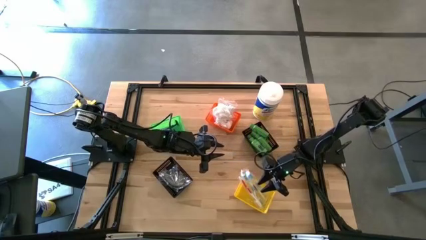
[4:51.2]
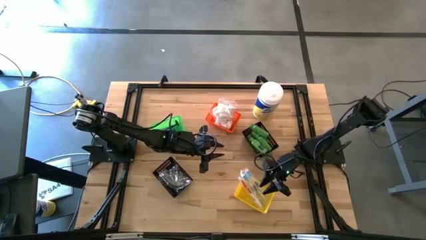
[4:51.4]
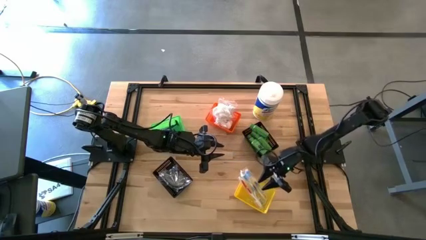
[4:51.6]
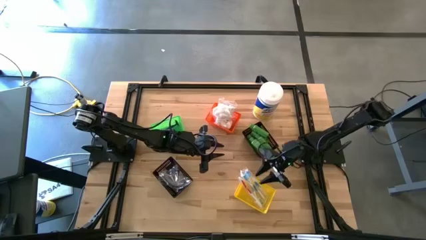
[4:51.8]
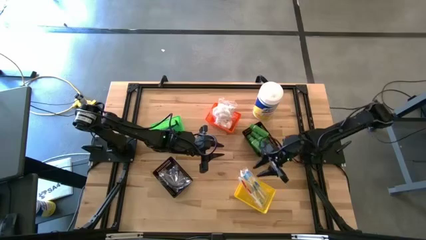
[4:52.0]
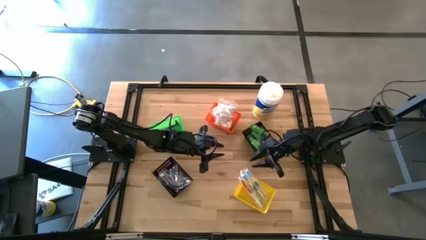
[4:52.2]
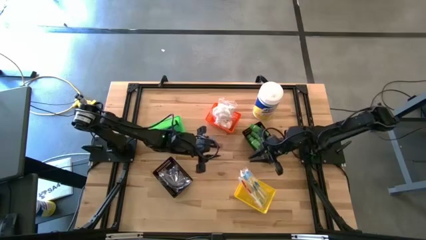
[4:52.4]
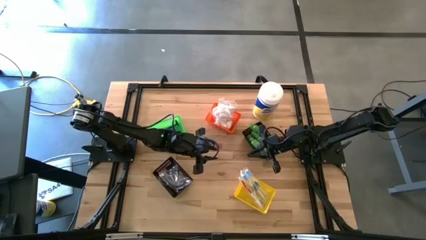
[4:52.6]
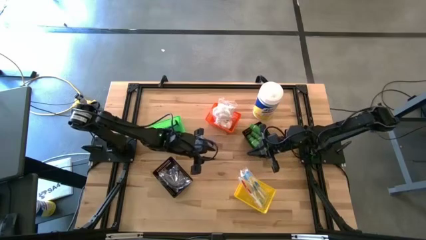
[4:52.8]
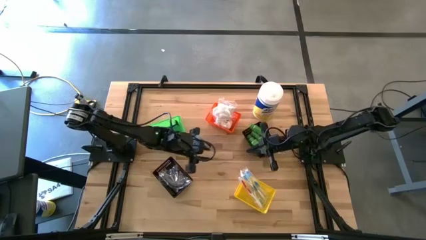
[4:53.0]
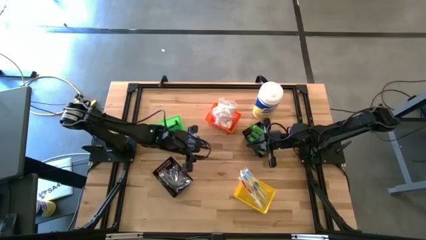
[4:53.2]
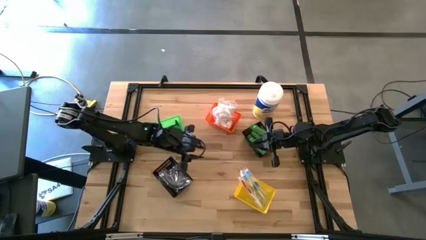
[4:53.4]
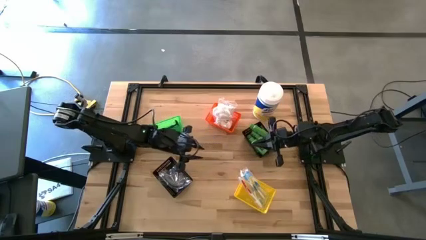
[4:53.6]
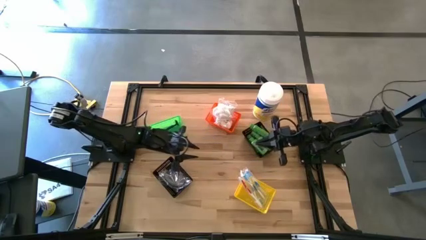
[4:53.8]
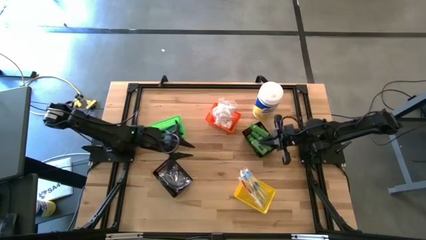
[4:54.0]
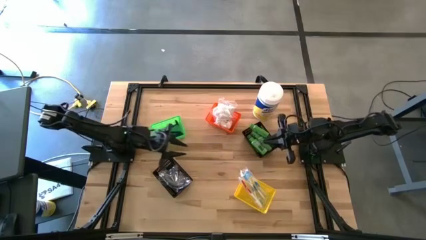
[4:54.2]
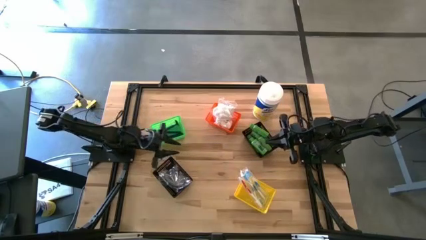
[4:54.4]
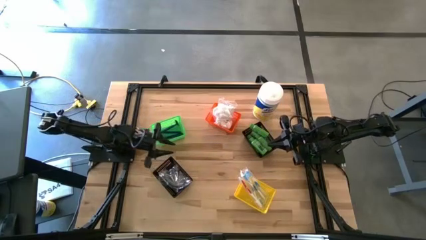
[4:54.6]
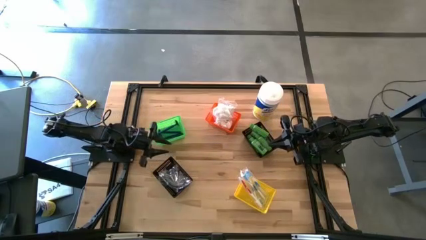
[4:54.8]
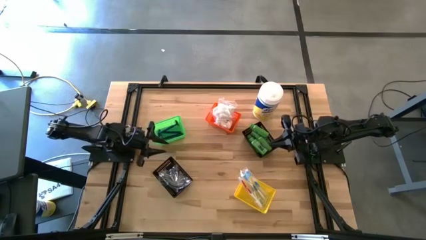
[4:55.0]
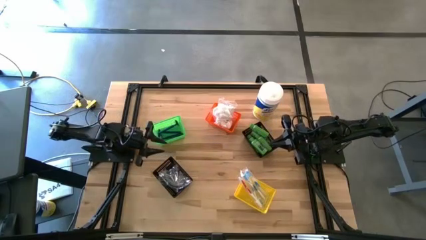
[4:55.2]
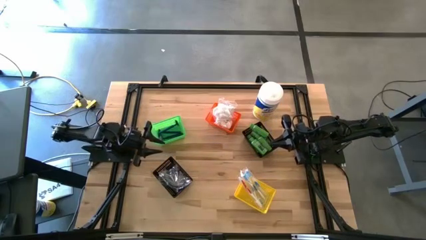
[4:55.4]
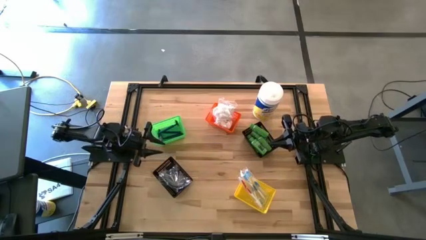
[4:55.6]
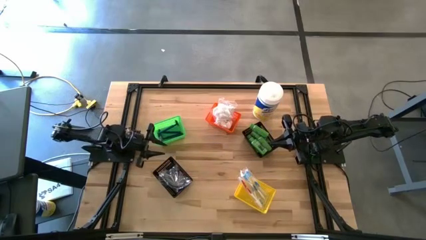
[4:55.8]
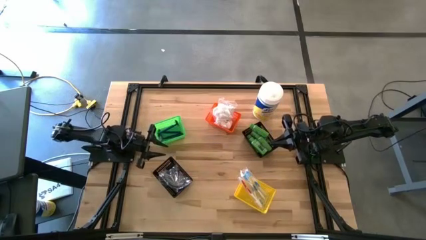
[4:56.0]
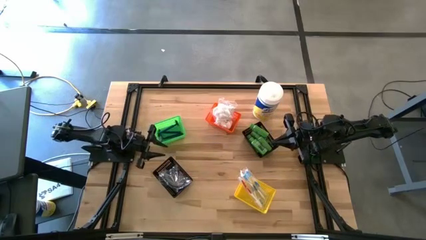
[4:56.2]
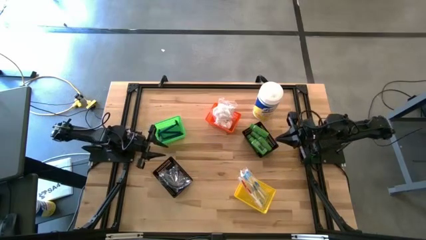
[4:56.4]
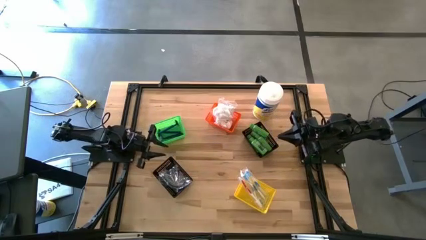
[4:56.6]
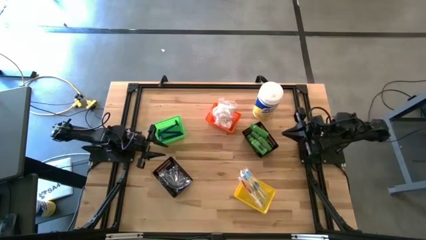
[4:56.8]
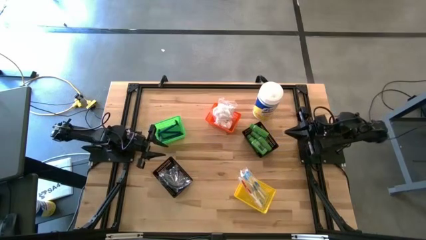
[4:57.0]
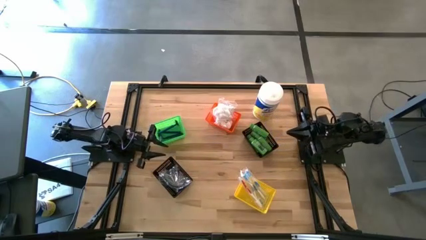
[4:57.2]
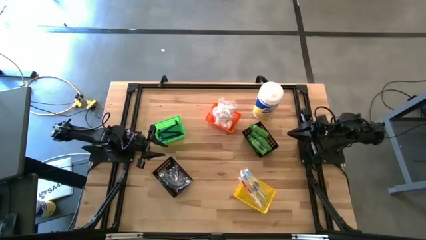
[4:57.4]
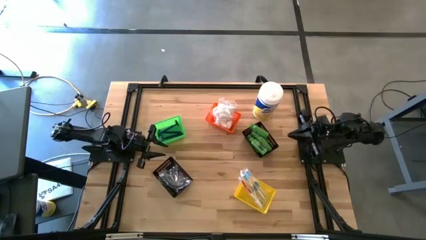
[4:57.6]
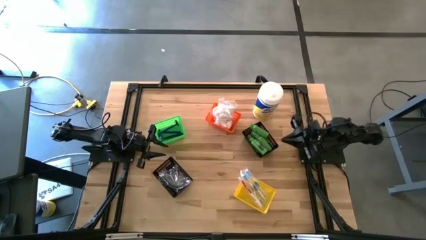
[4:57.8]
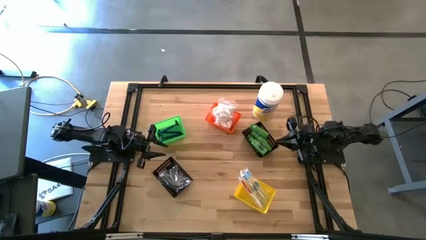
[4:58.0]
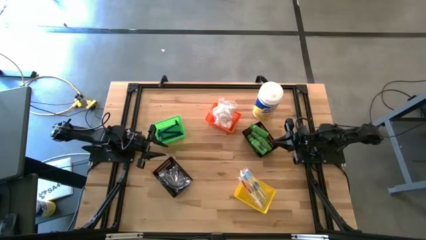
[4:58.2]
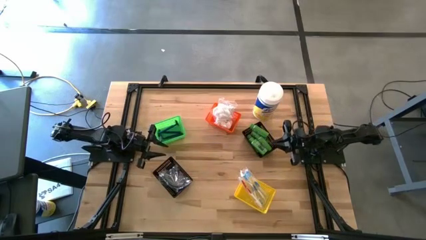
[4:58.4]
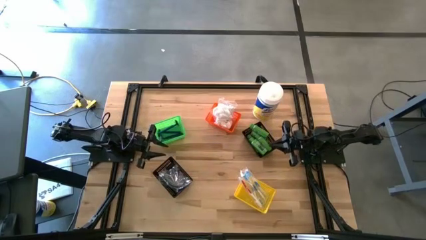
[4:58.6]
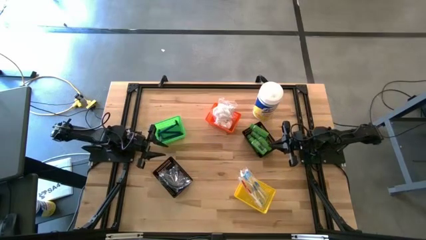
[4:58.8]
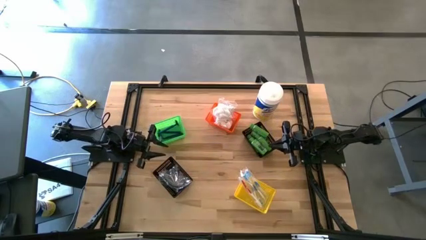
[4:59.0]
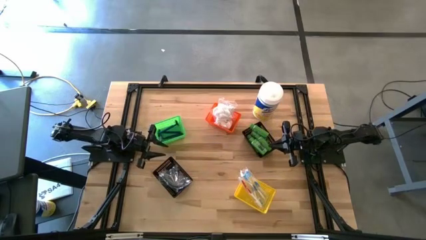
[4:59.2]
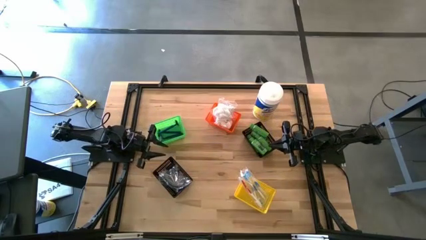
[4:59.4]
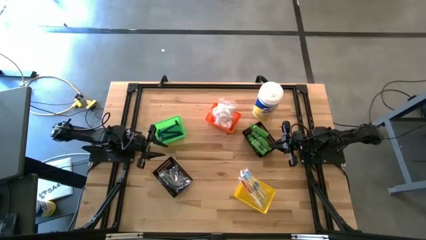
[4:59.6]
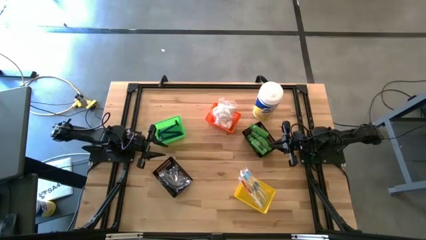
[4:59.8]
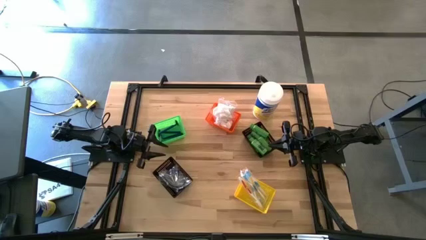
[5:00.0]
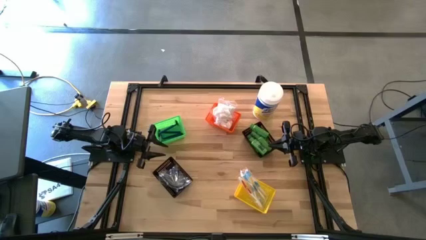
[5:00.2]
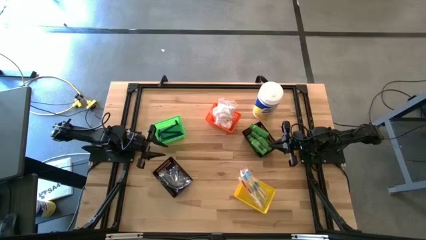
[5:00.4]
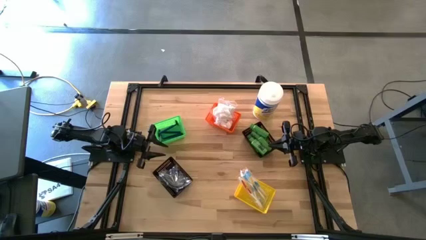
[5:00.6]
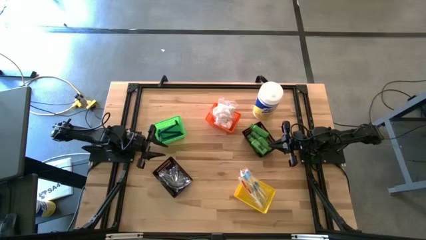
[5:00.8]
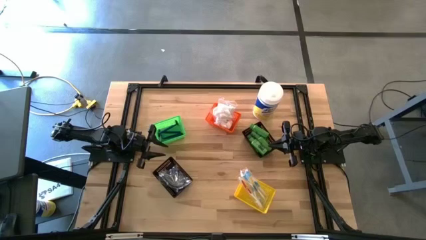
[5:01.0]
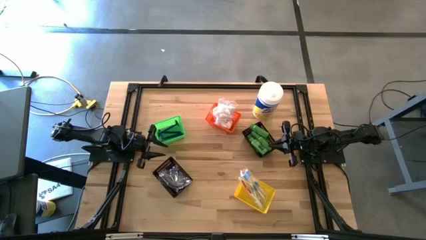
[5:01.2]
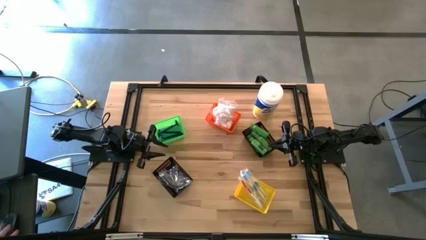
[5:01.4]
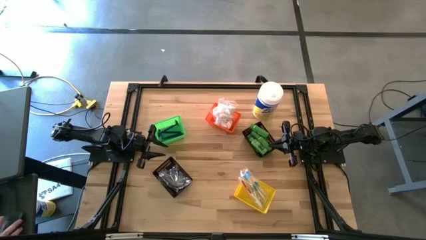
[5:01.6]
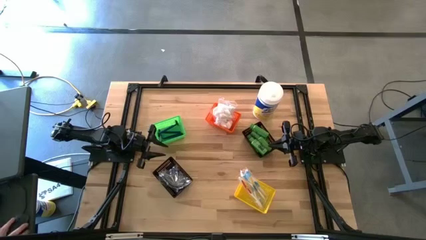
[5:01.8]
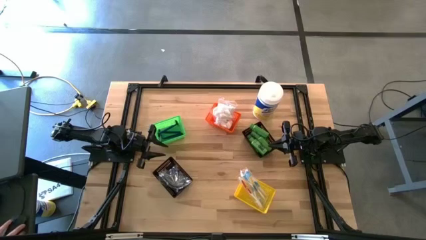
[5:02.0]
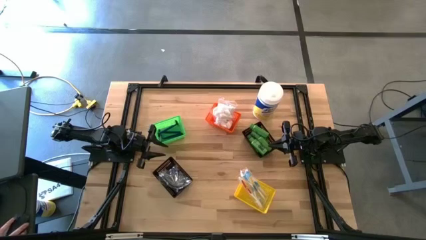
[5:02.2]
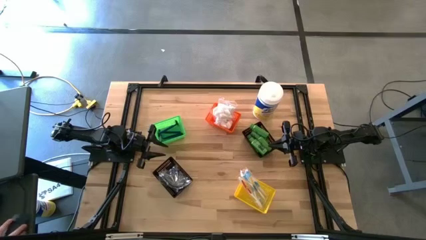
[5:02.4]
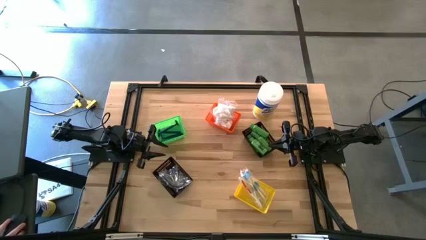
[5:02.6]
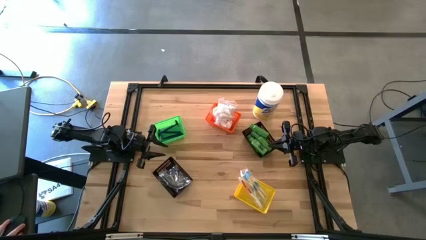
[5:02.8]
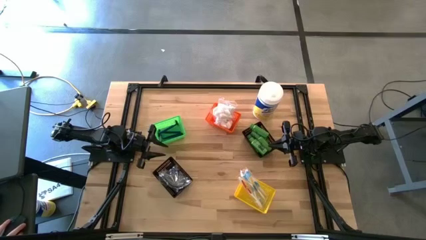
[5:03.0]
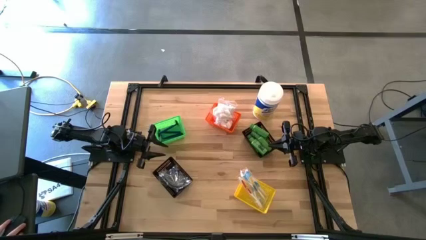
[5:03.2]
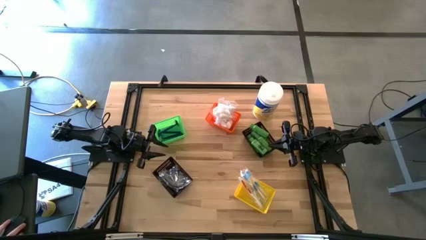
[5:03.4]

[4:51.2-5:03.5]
Task: Pick & Place Travel size toiletries
Return to Home Position
